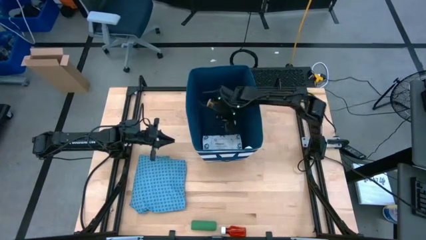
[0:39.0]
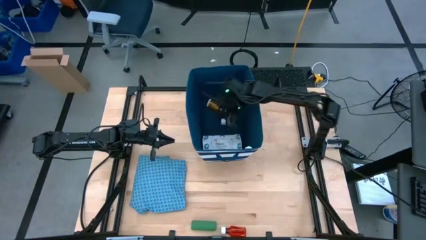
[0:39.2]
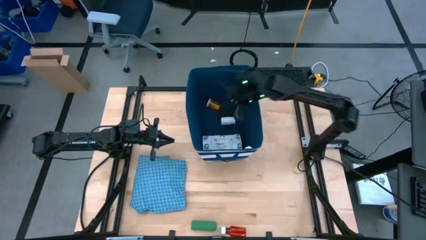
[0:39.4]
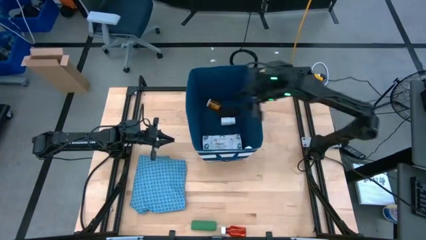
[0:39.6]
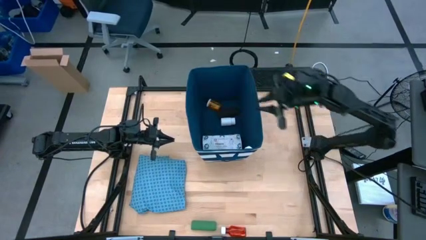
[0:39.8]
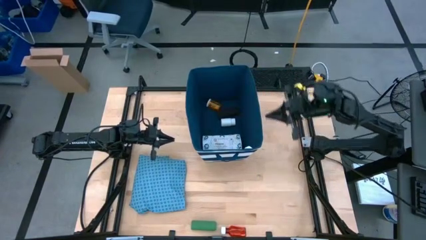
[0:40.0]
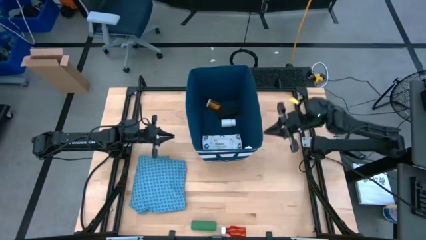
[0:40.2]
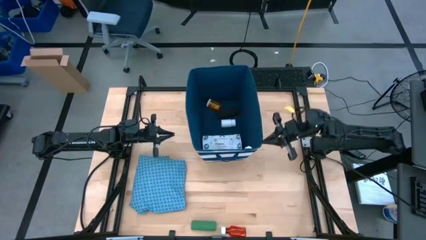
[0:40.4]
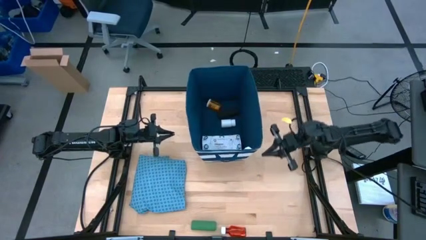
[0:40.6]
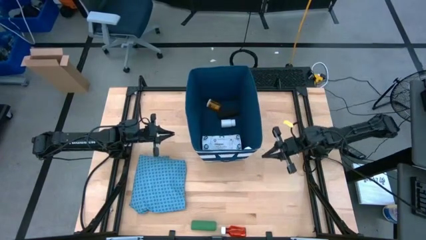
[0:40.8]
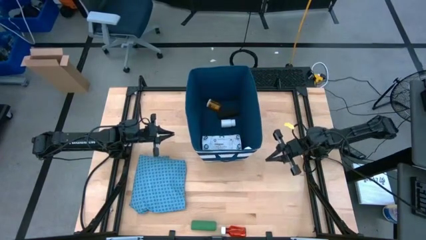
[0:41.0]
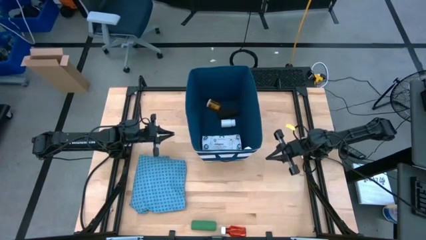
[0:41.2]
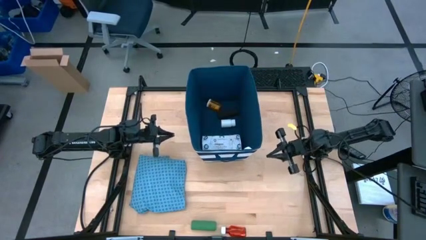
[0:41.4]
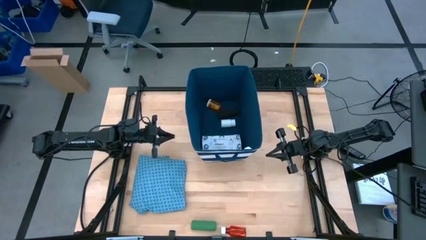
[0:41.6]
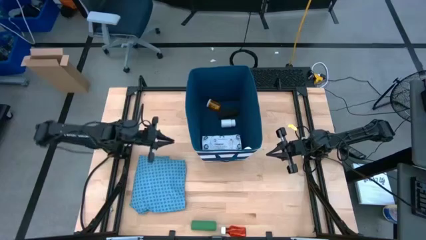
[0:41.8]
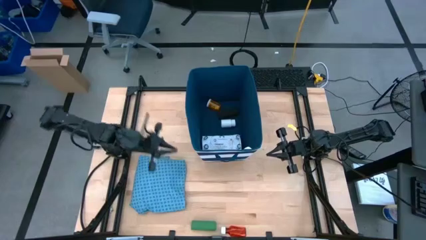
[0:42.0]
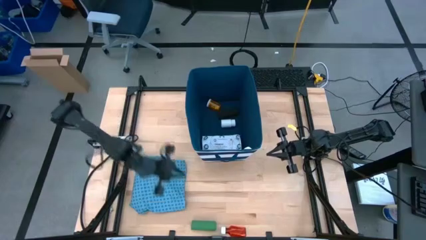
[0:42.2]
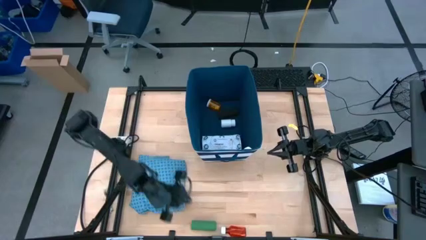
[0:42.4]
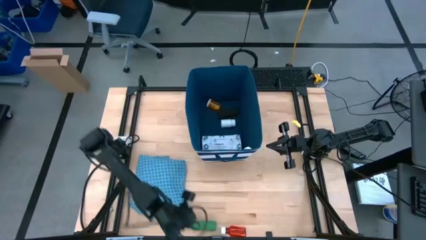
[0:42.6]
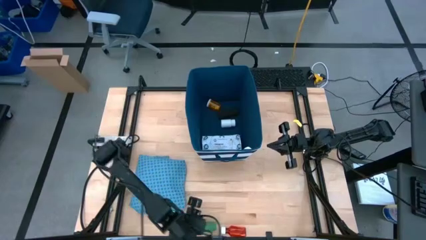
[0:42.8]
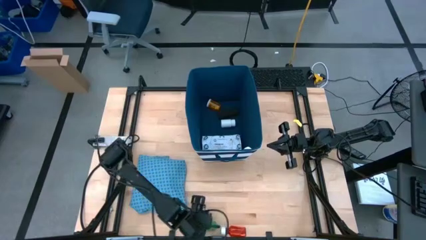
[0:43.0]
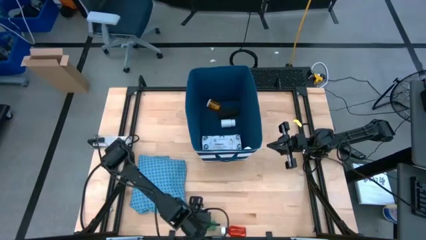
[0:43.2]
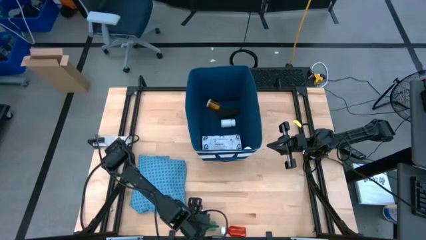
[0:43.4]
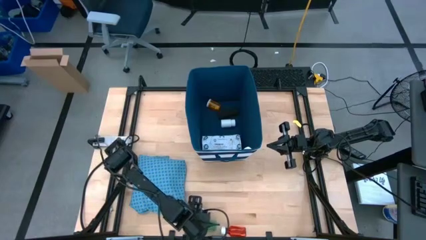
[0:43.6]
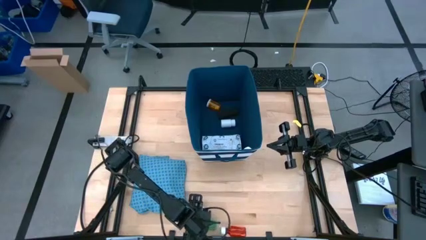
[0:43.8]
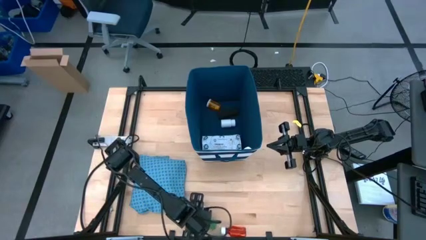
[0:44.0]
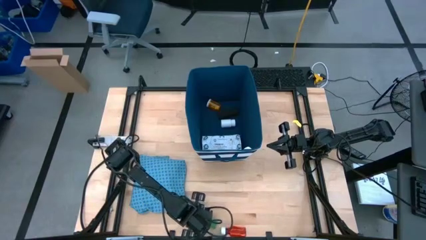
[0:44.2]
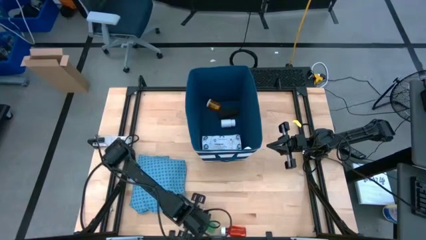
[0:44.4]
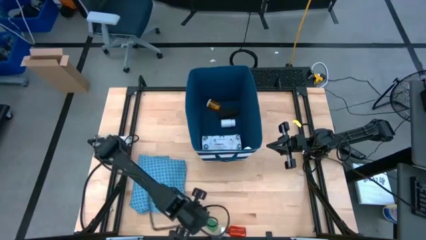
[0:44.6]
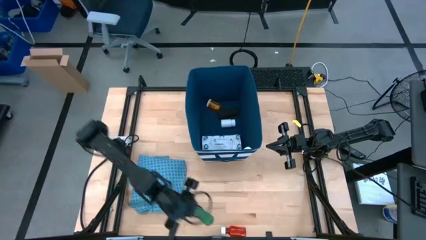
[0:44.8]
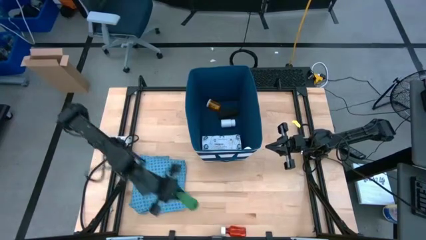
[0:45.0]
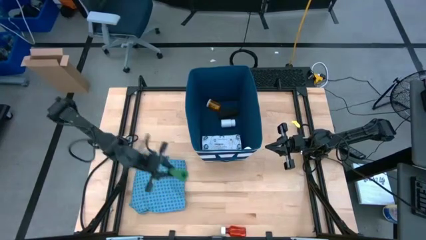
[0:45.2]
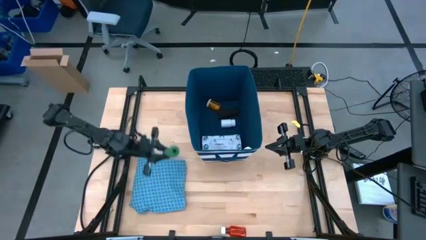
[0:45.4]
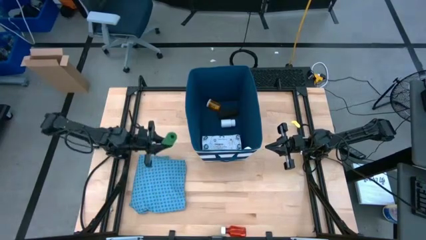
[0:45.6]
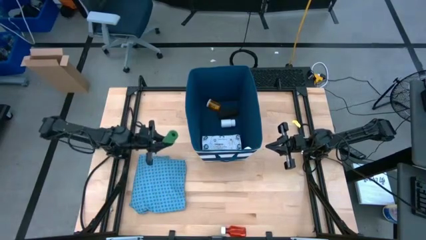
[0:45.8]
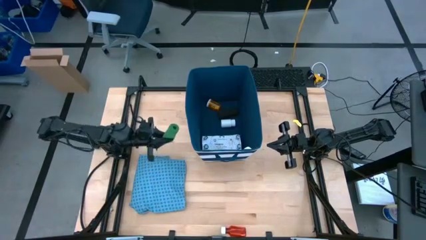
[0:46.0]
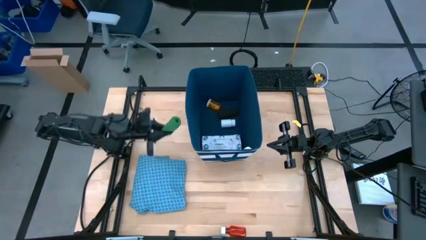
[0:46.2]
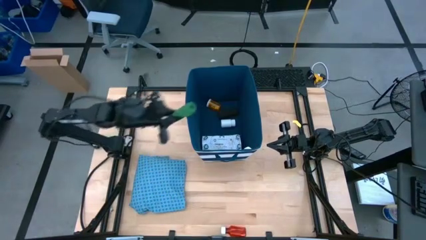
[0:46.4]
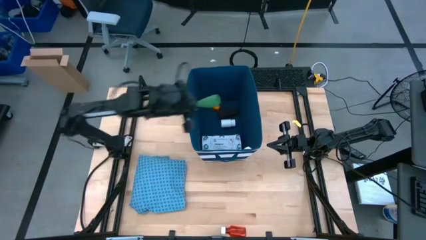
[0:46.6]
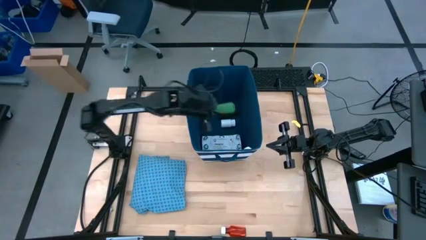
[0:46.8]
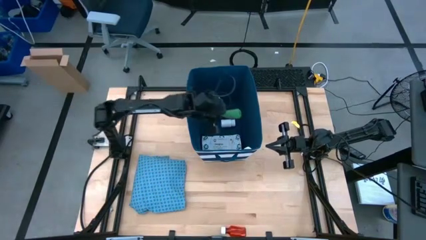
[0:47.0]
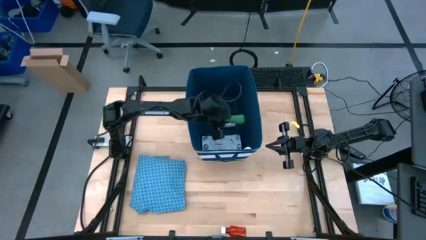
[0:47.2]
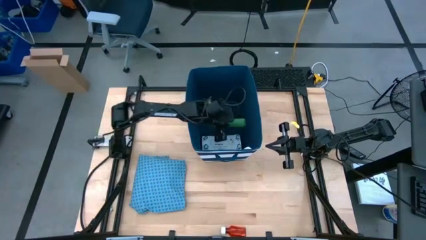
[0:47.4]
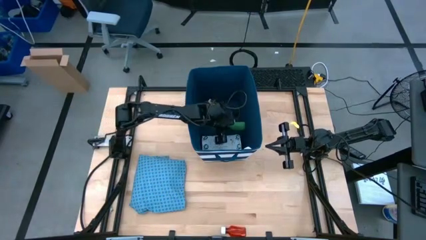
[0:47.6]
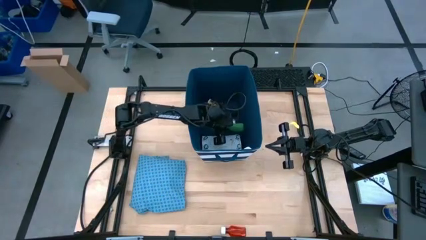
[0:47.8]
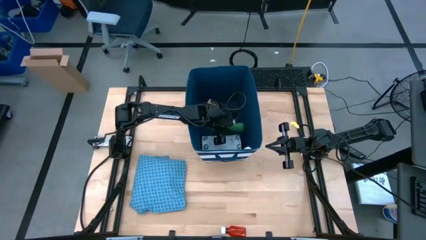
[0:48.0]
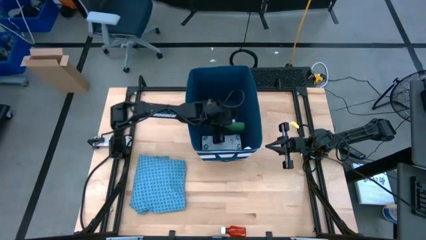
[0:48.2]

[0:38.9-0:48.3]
Task: Pick & place medical supplies in basket/bin
Put the green bandage into the blue bin

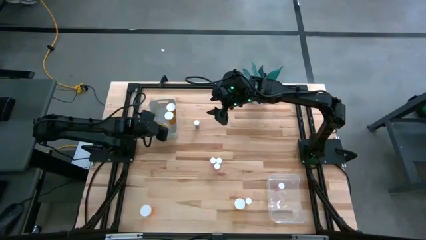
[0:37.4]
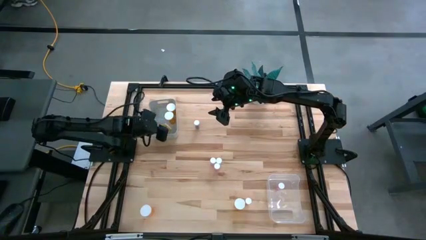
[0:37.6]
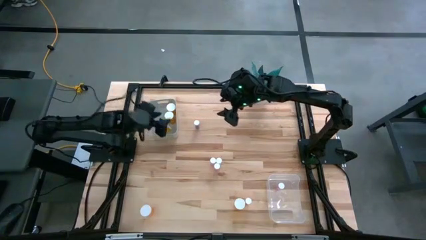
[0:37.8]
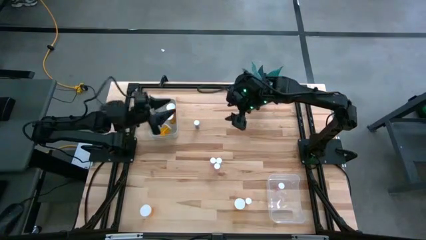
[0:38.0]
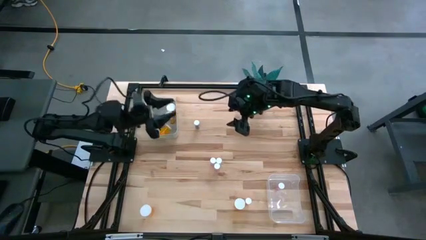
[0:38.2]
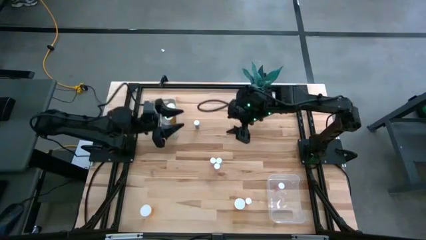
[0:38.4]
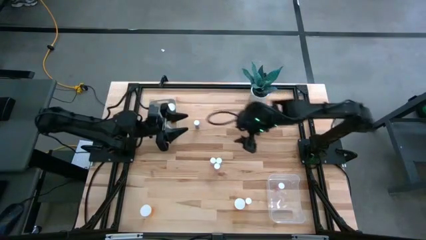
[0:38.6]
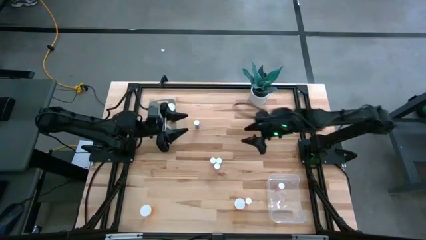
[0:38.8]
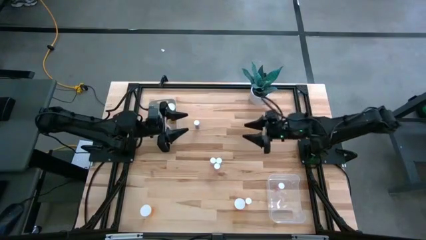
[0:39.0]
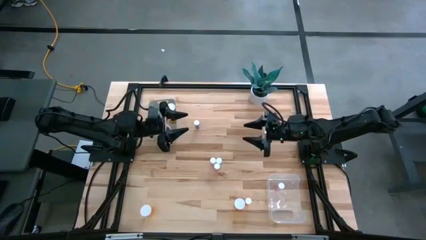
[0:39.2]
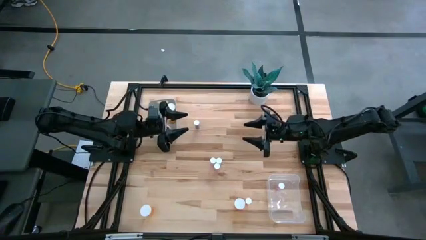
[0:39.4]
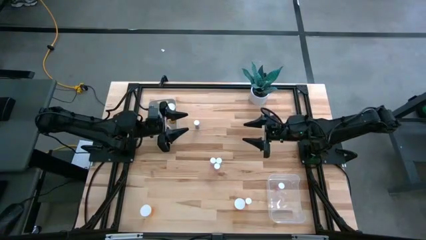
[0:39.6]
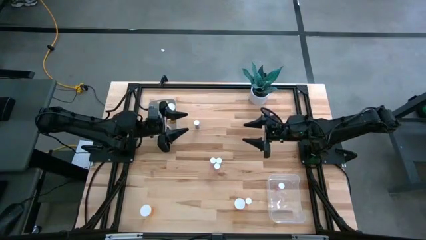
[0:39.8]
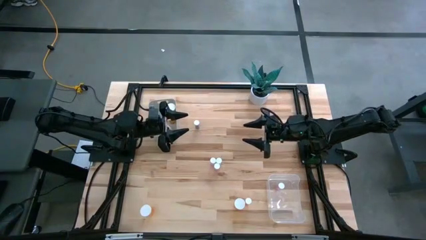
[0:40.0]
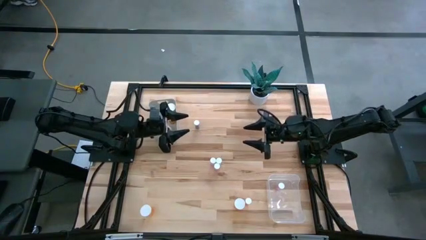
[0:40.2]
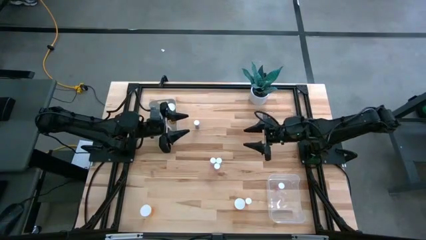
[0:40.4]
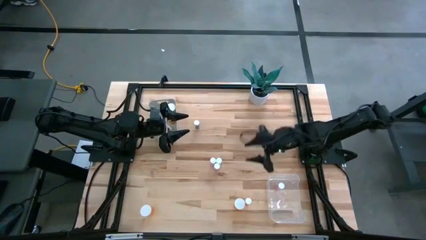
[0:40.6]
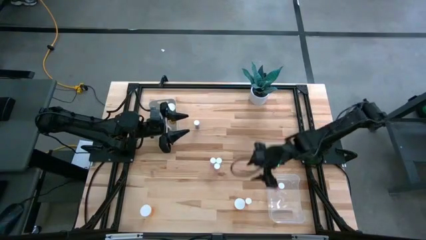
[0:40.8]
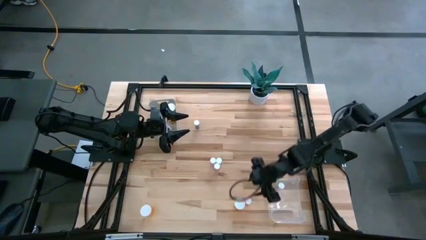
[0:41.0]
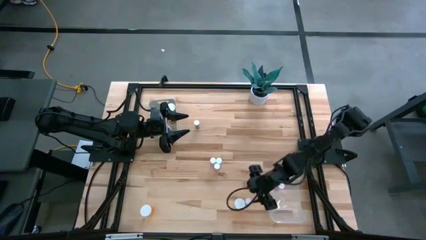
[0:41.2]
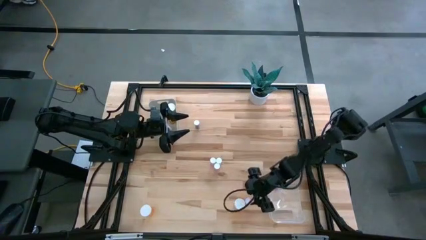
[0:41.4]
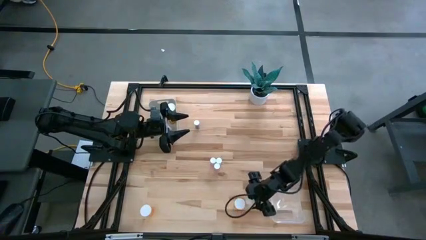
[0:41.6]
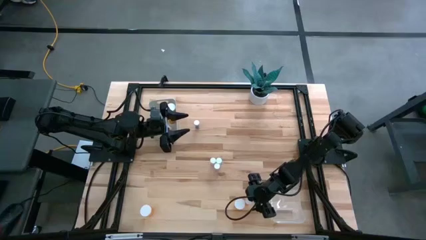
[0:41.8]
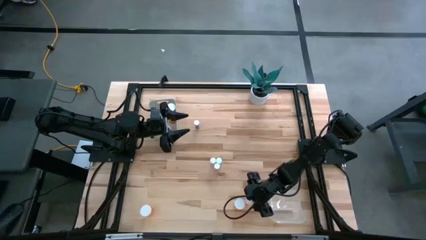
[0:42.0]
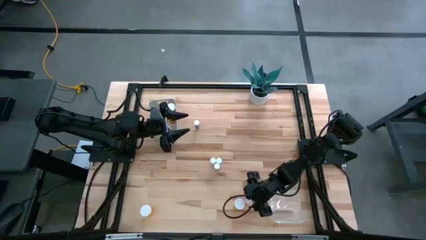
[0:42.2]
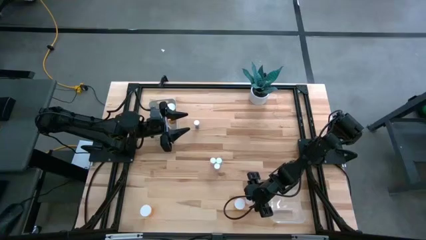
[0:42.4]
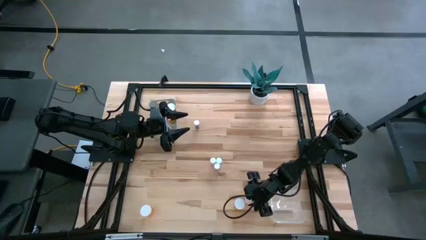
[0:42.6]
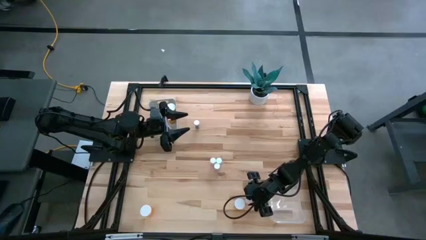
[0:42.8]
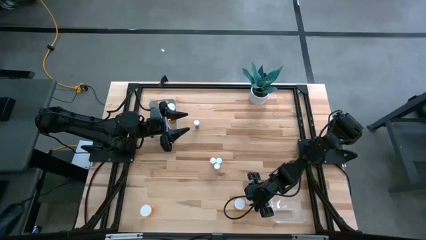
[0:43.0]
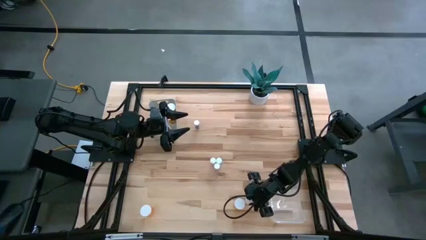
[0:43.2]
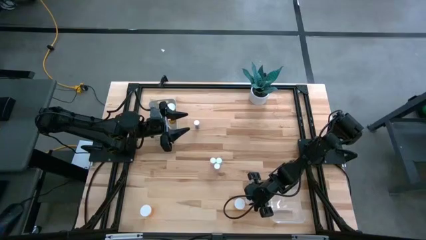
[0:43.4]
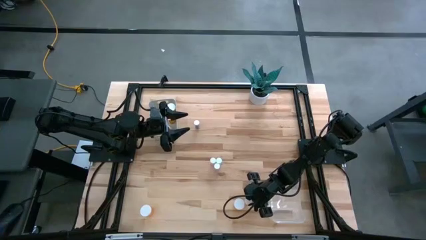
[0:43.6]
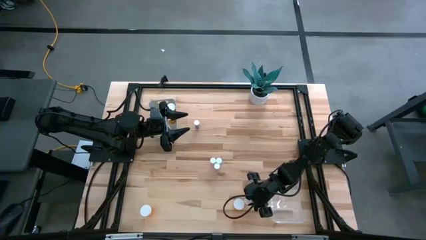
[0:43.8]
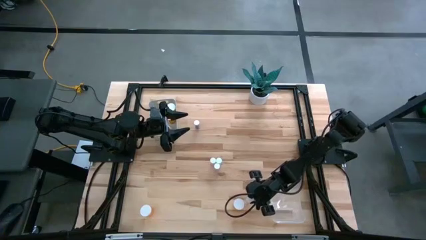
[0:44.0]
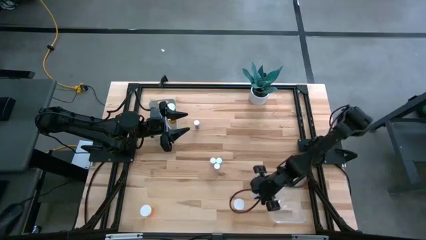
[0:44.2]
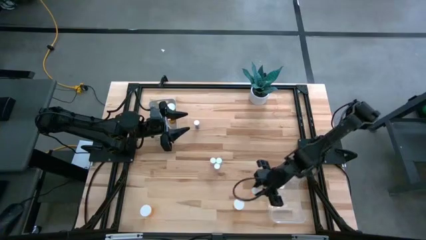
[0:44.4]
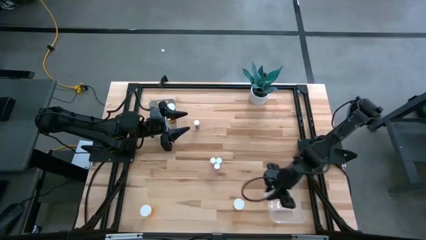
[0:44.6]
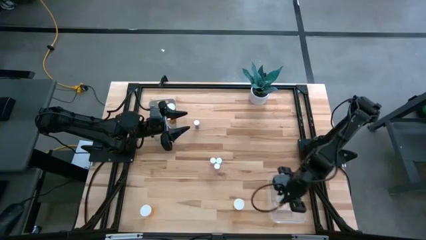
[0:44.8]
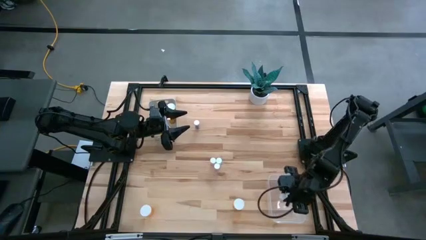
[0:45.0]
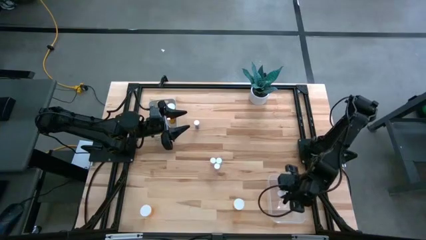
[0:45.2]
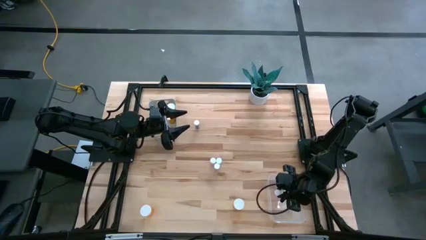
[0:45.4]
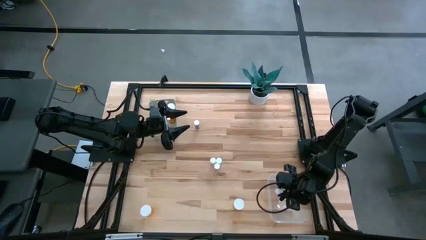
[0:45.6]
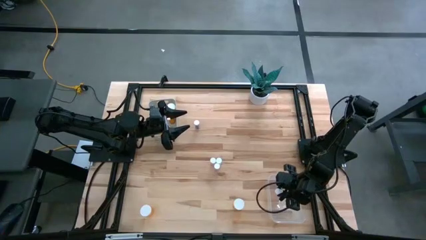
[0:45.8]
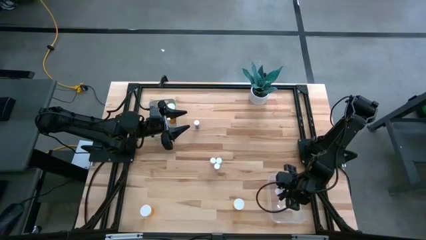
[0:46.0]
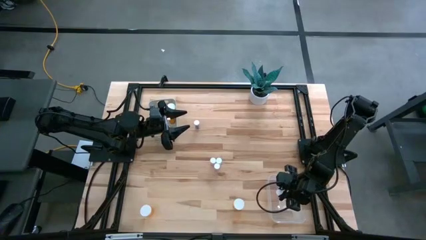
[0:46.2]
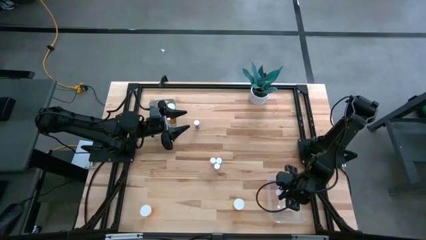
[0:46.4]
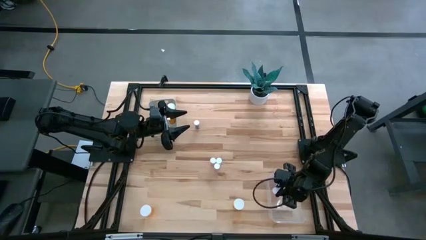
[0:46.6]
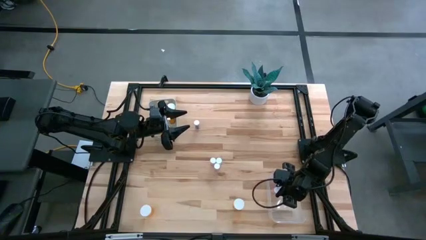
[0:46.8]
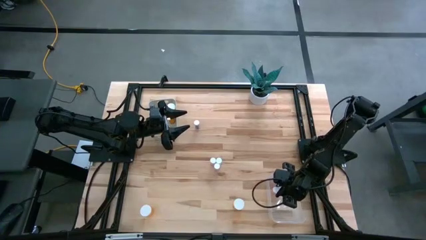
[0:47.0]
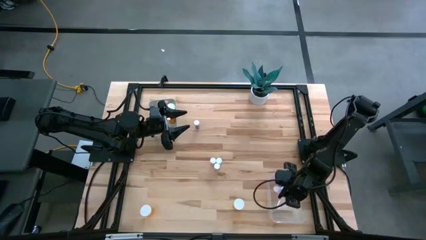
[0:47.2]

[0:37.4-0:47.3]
Task: Pick and place medicine bottles into bin by pill shape (circle, oval)
Put the bottom pink tablet bottle into the transparent bin
